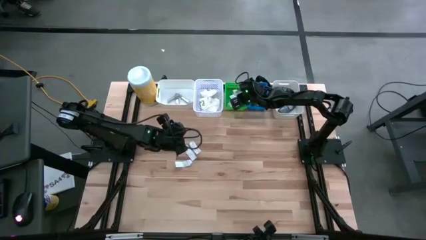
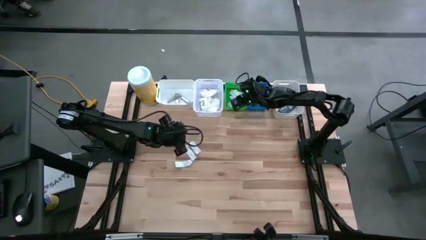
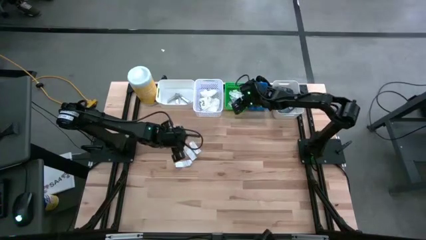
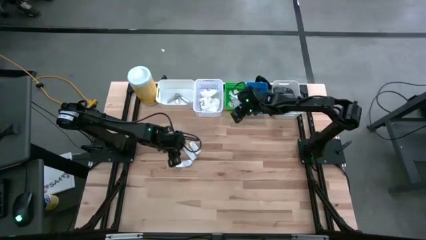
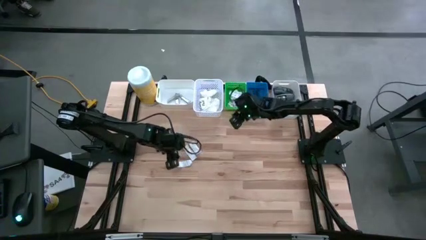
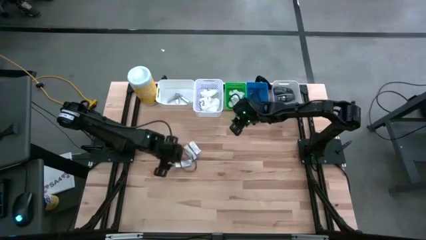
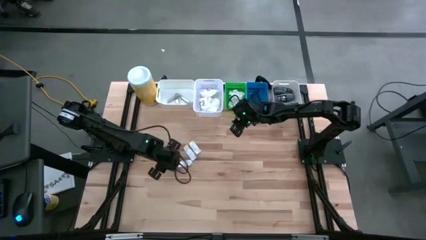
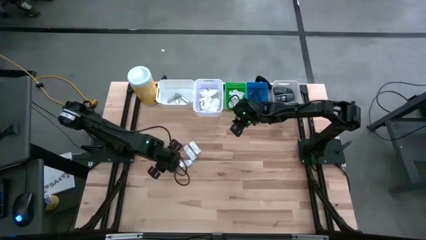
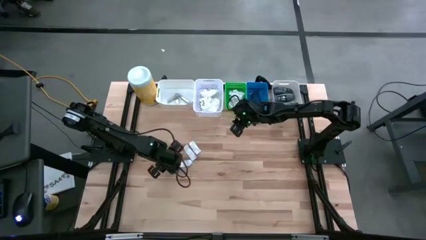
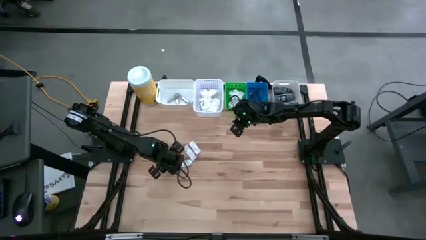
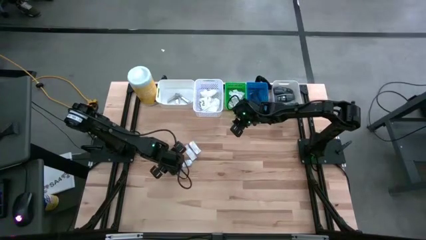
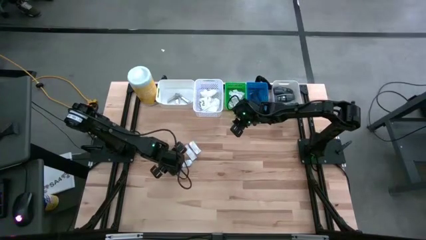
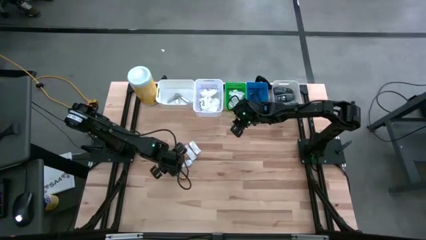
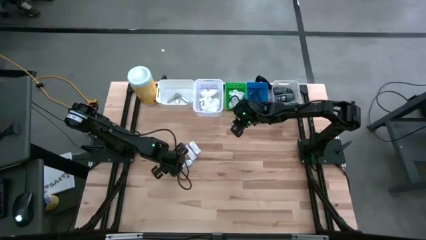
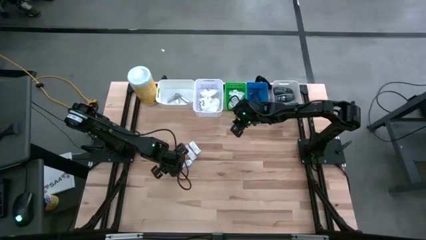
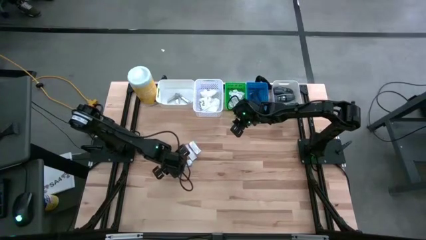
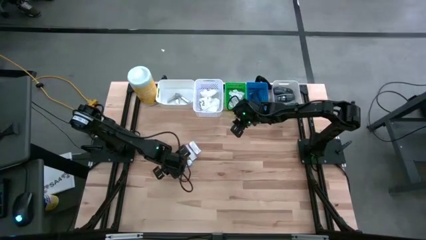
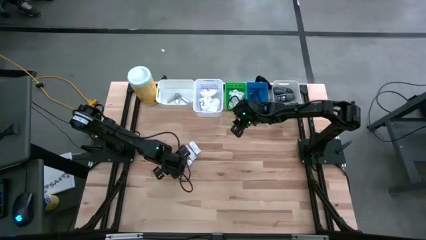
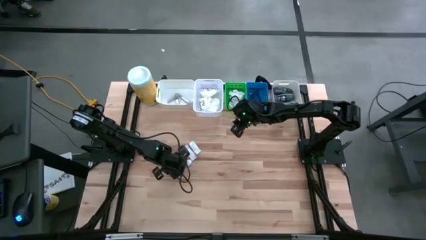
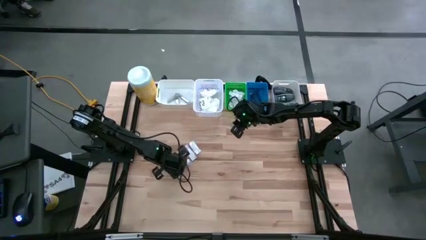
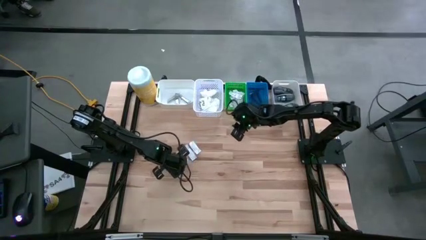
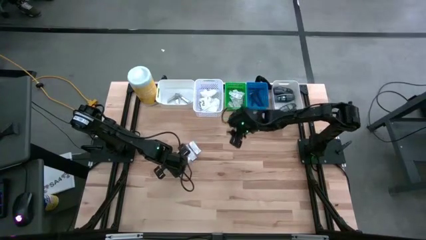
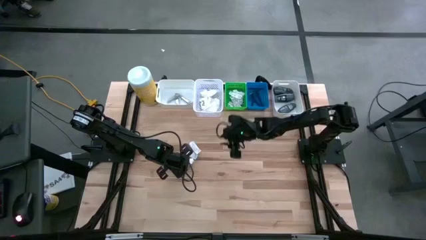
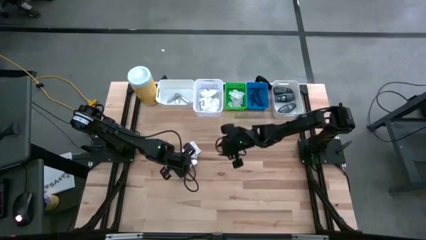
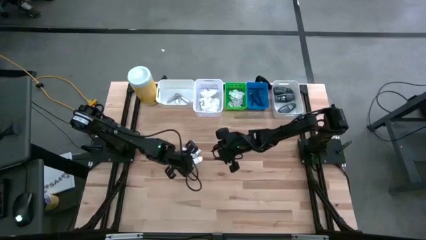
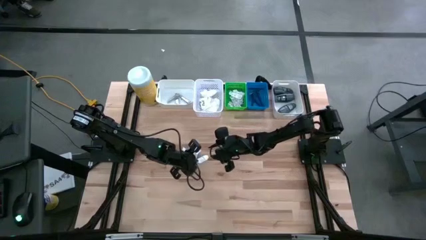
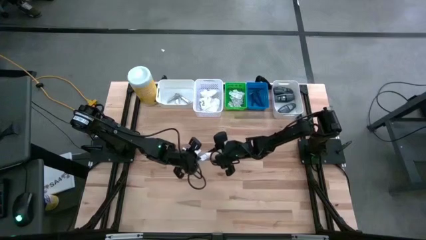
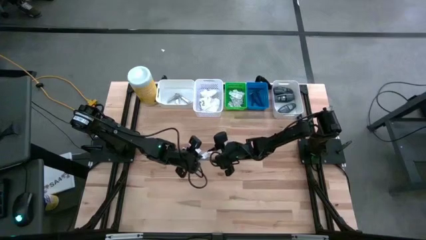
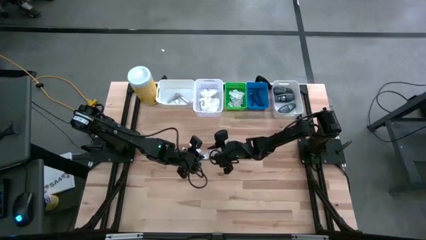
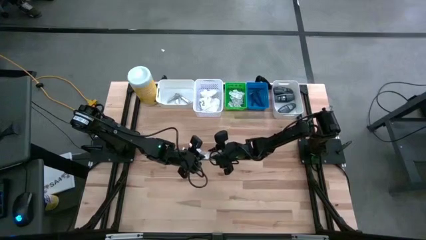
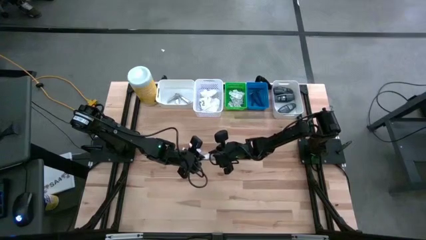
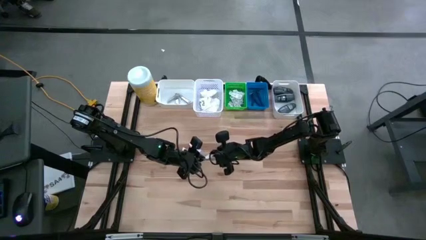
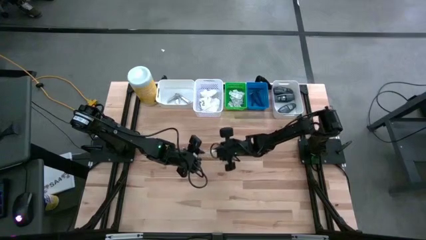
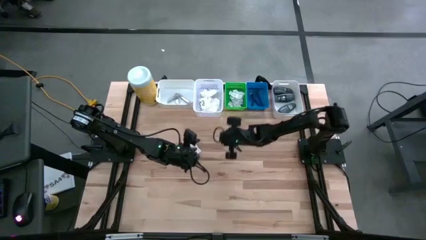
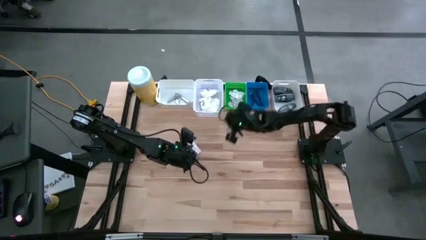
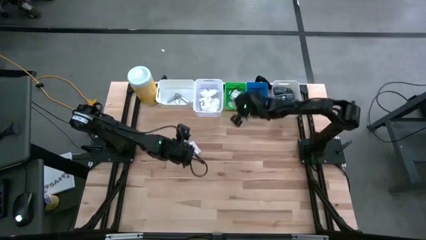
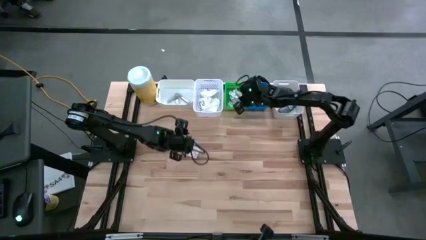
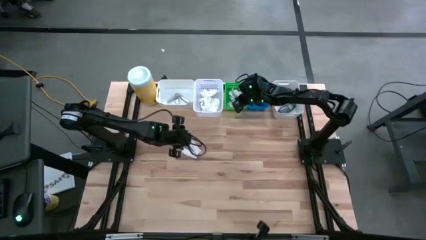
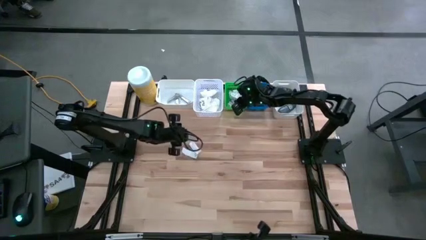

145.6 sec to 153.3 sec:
Task: Pick & Place Travel size toiletries
Put the white bandage into the green bin

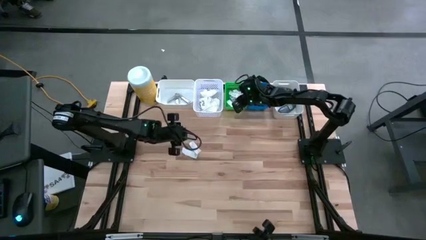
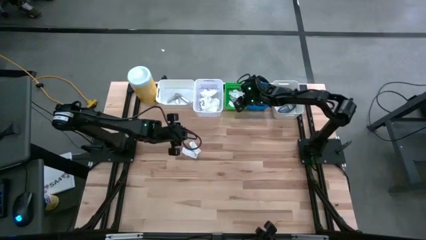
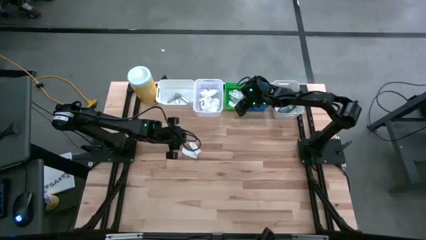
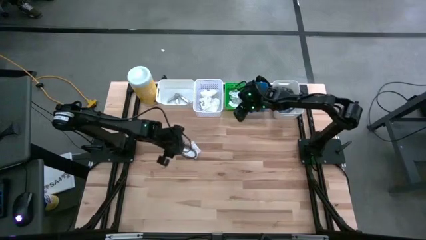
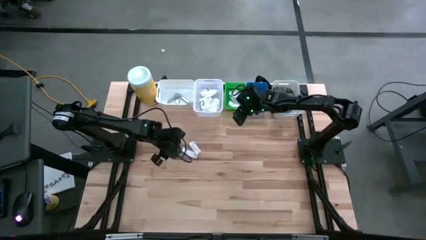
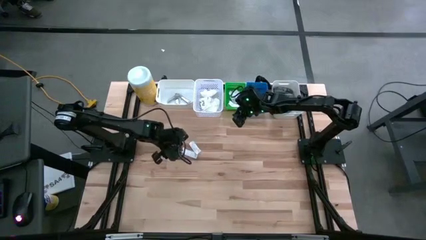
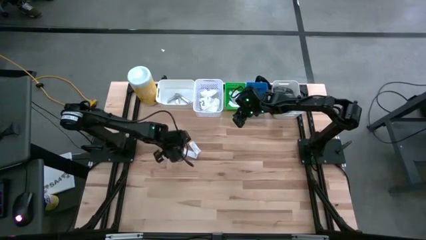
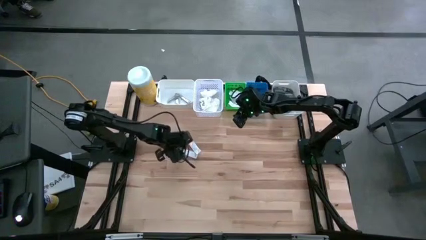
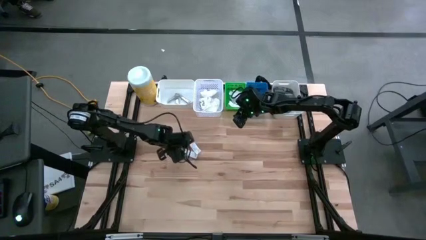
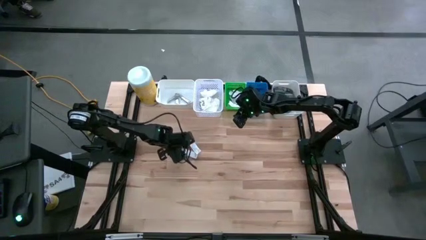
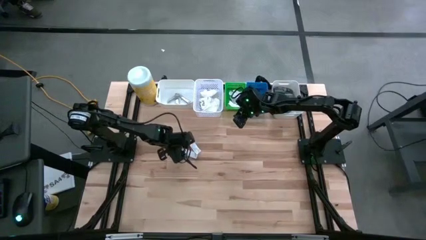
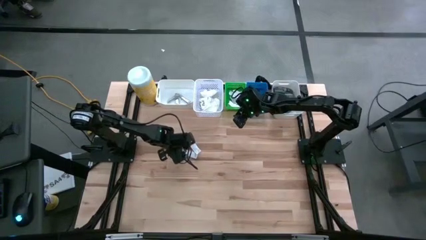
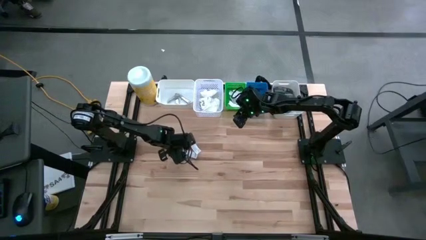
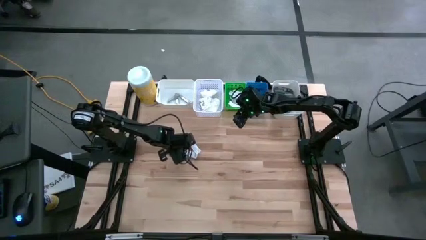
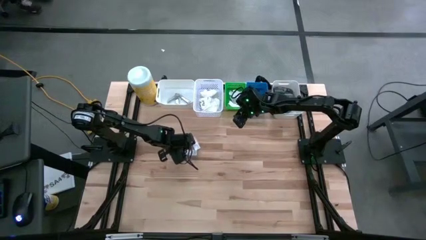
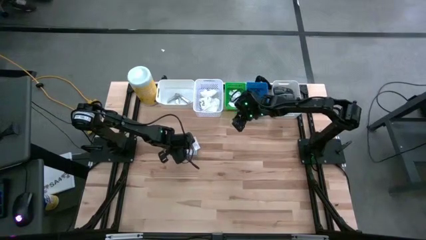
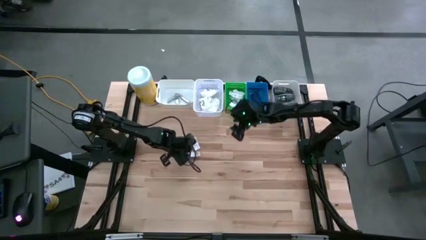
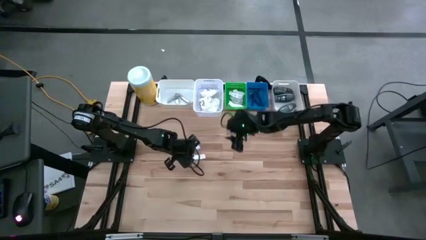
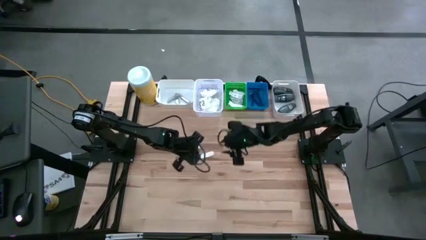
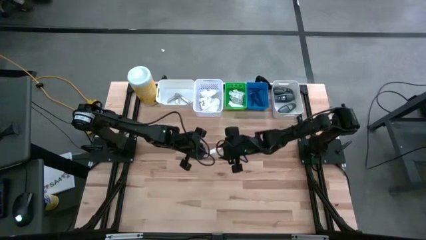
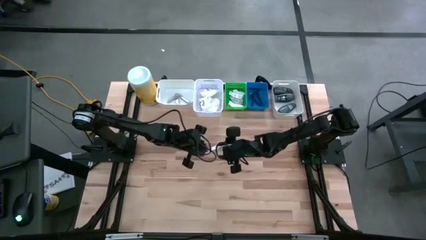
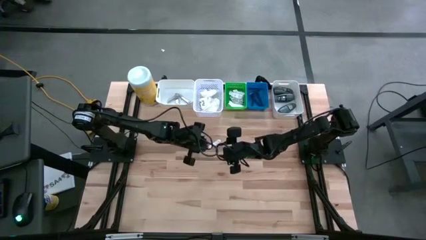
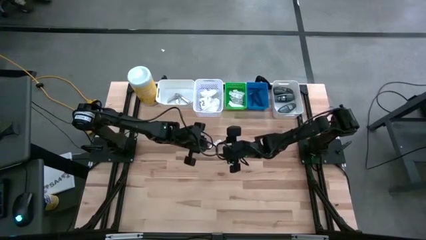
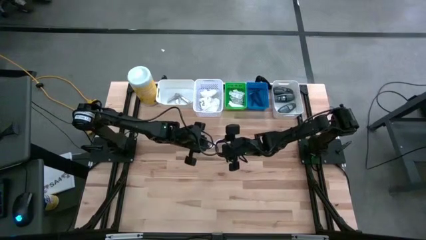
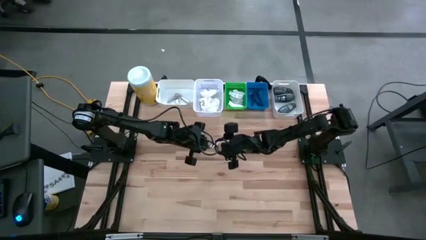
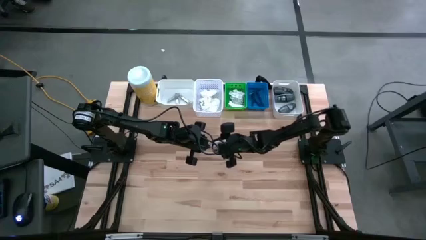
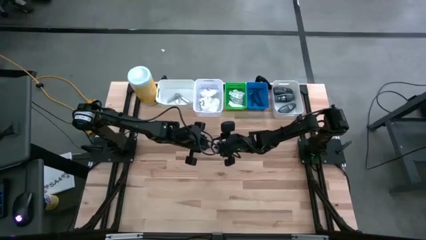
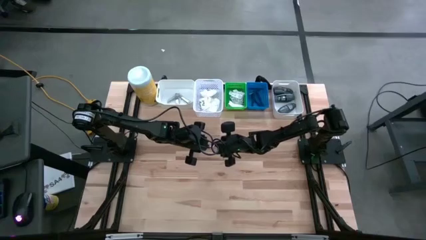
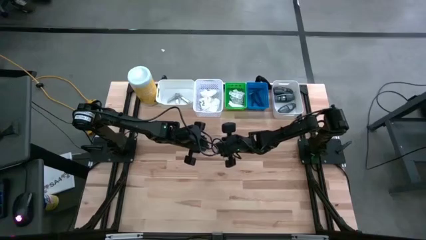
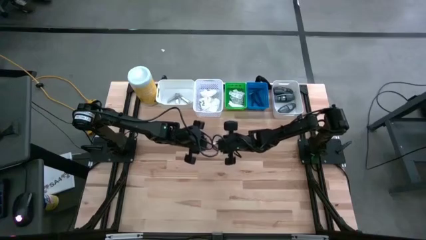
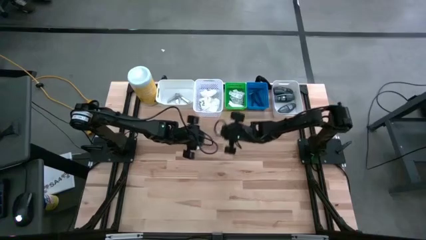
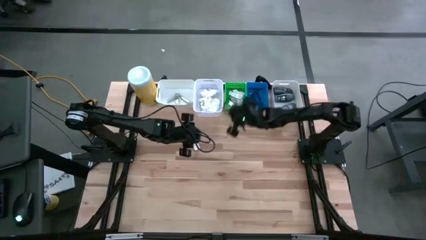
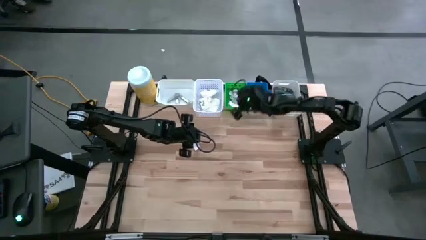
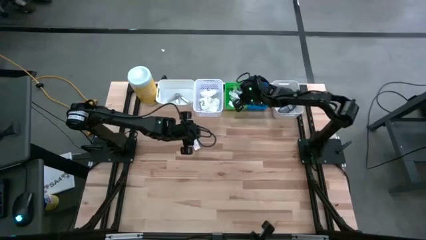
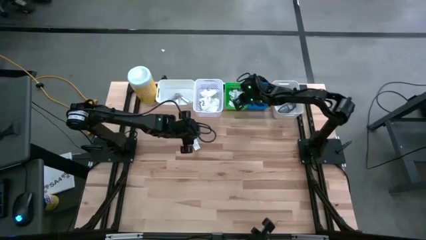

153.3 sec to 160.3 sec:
Put the white bandage into the green bin

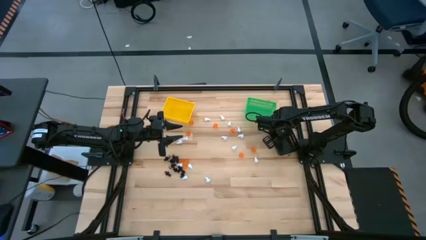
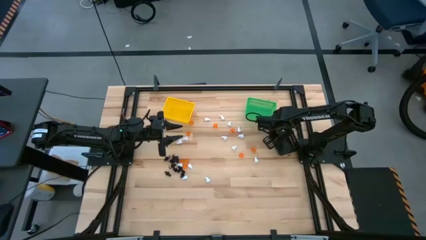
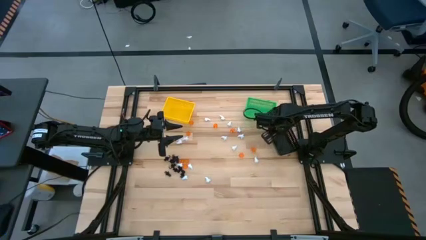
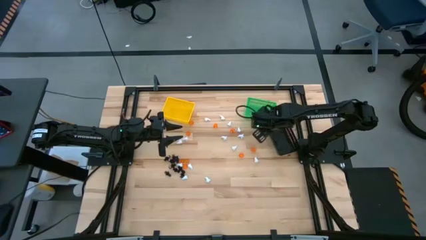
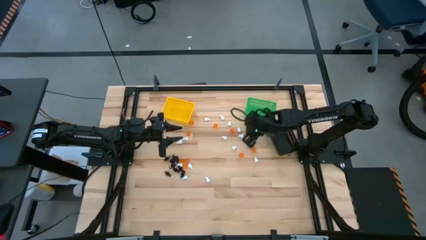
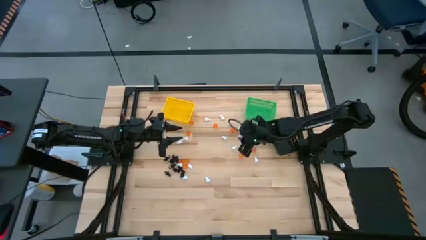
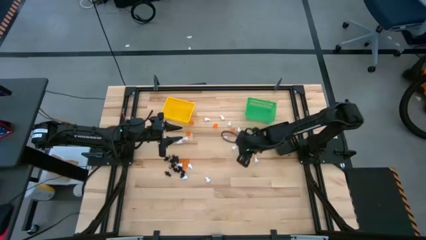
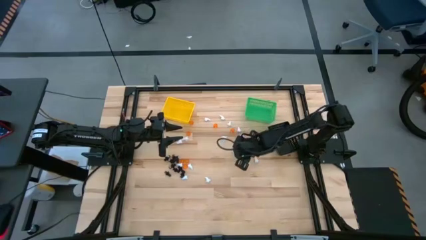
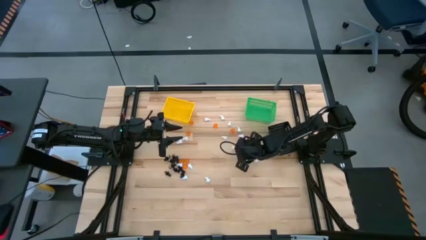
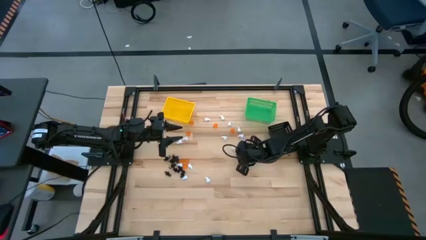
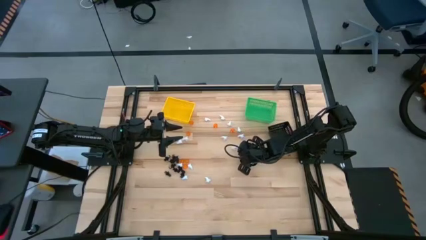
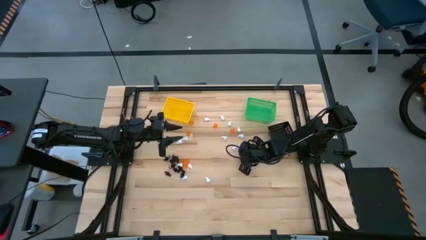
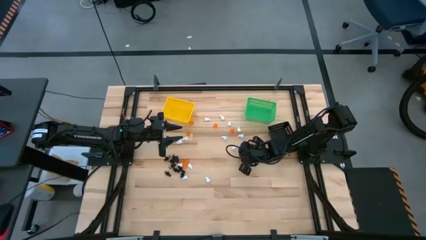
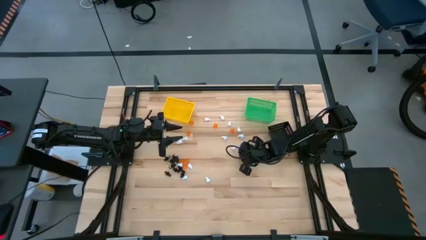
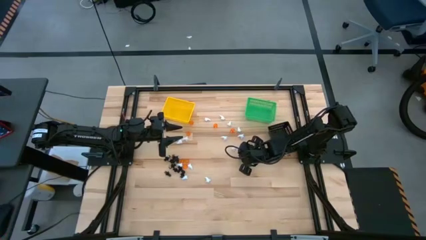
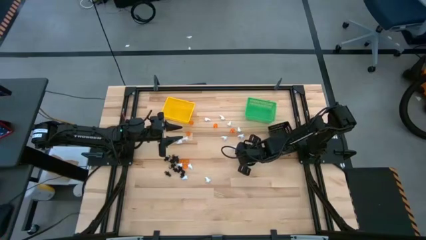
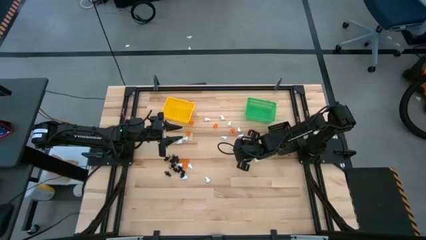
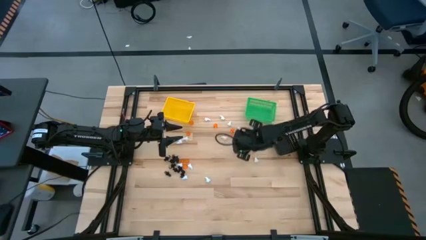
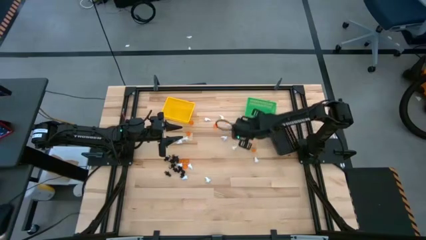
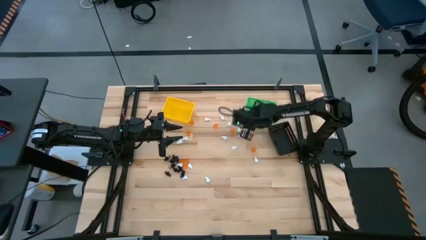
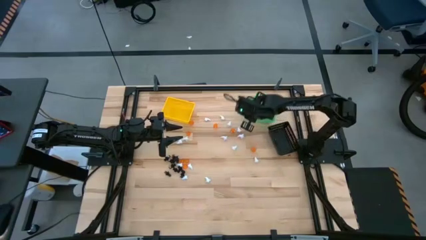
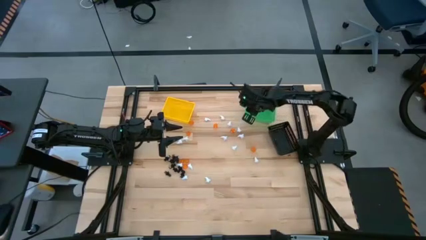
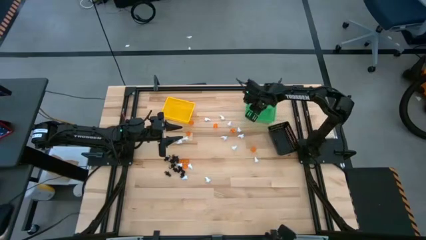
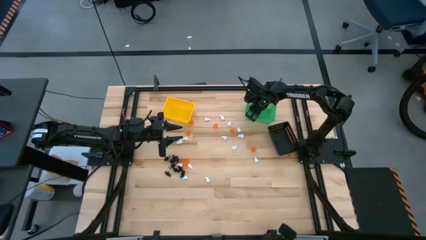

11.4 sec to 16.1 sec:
Task: Sort Halloween decoration
Put the orange pumpkin toy into the green bin
